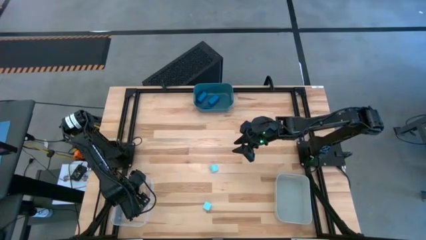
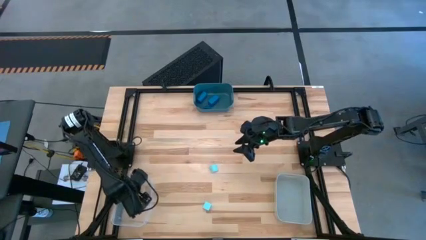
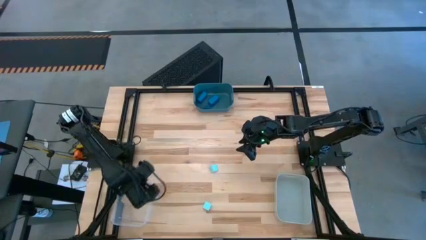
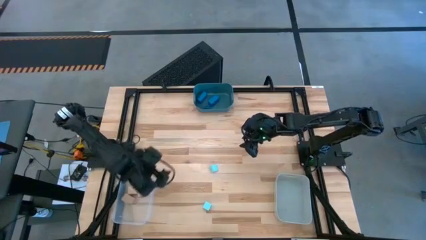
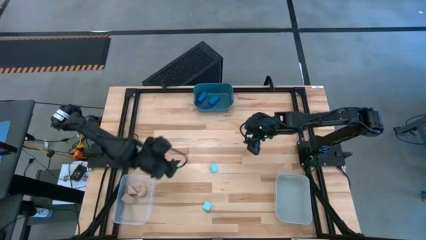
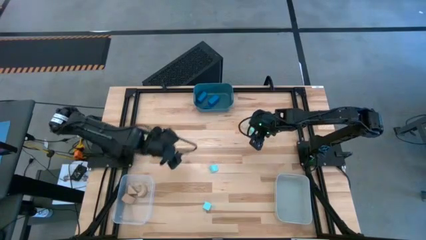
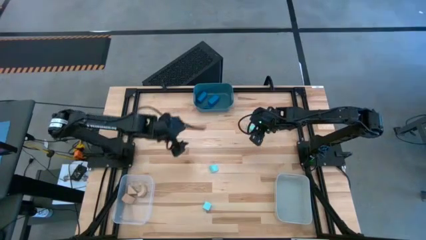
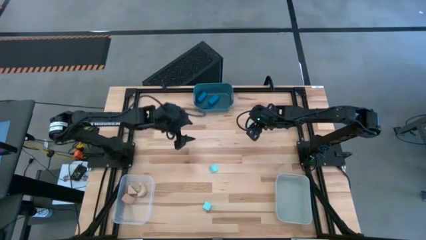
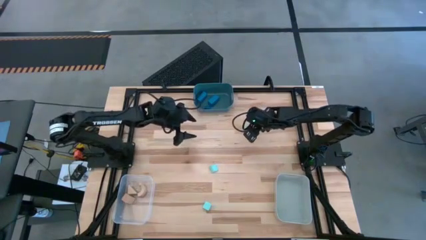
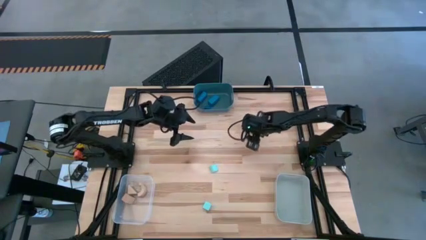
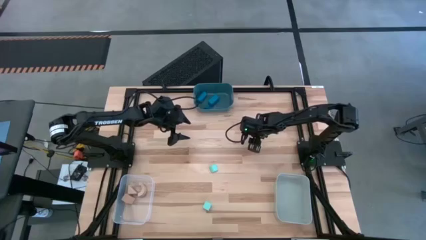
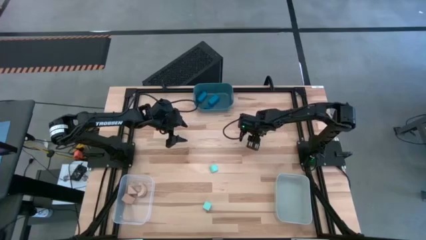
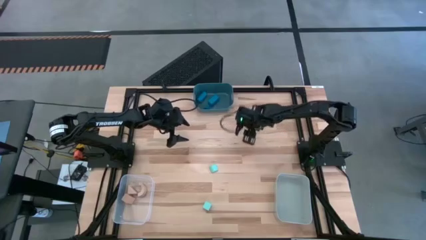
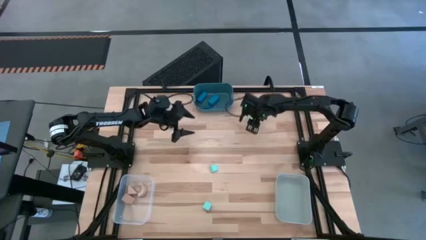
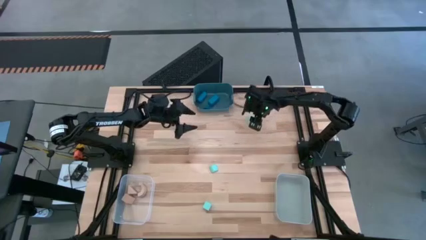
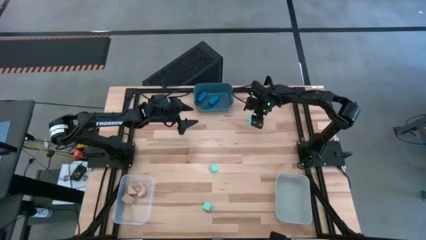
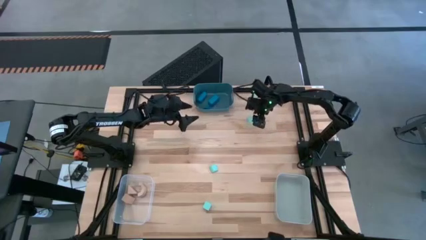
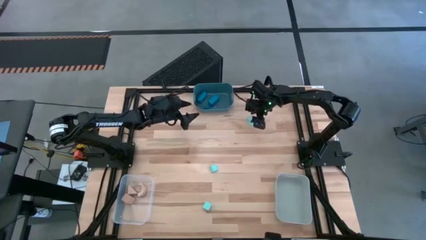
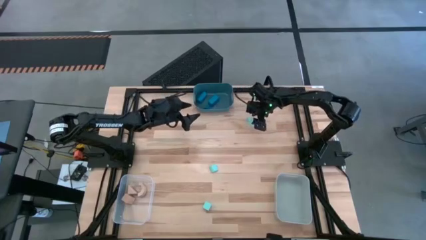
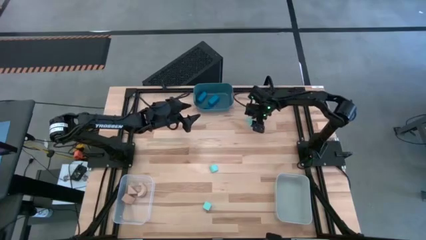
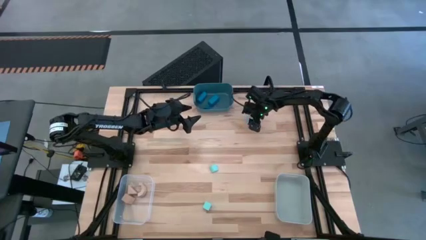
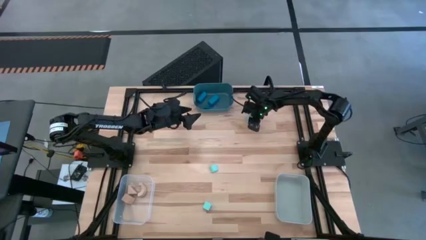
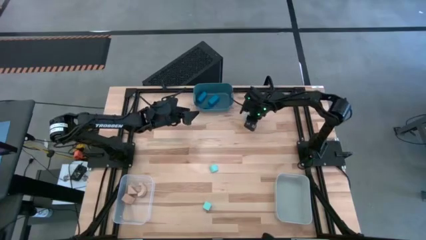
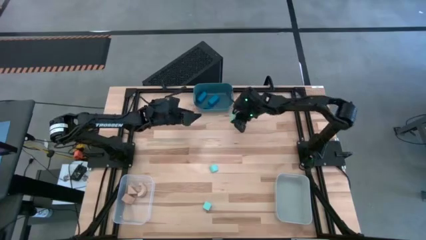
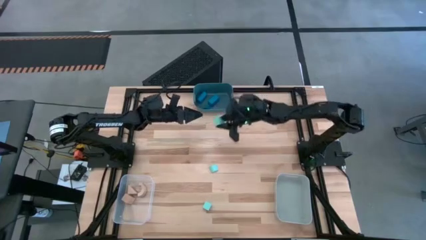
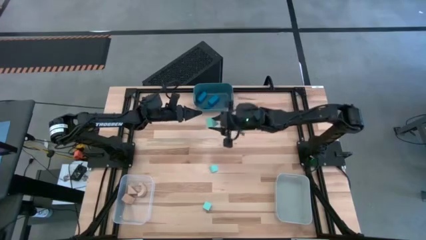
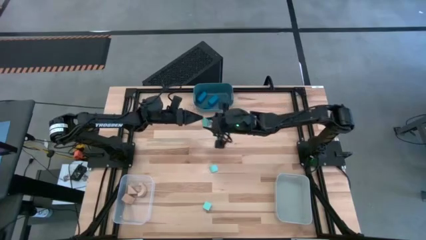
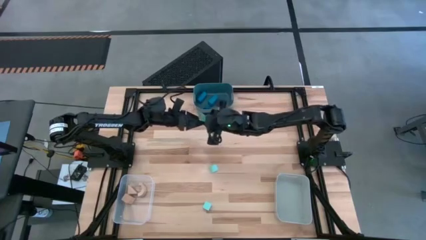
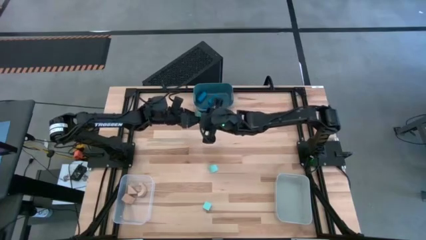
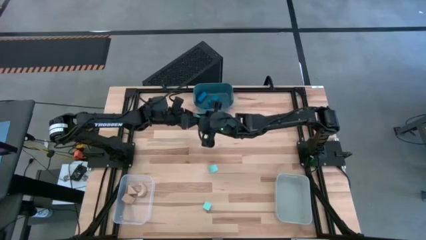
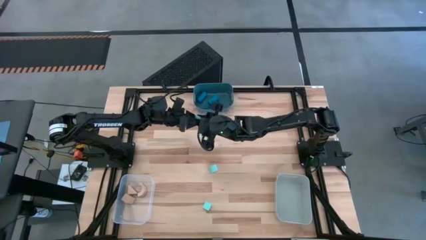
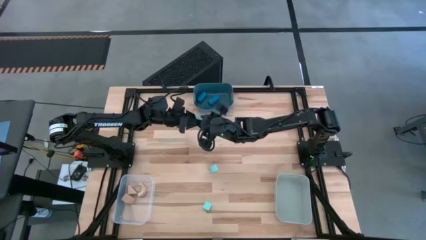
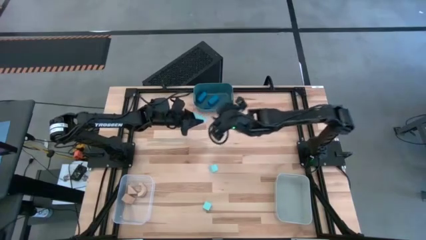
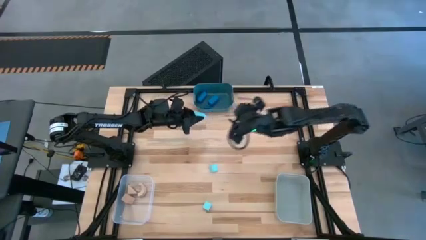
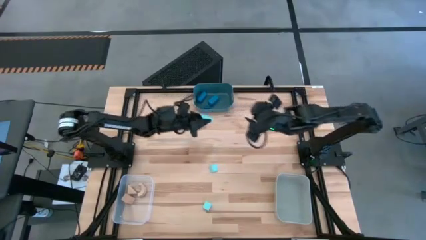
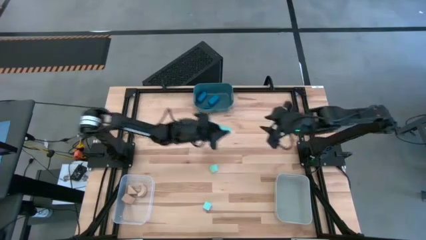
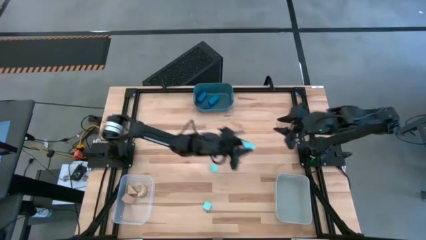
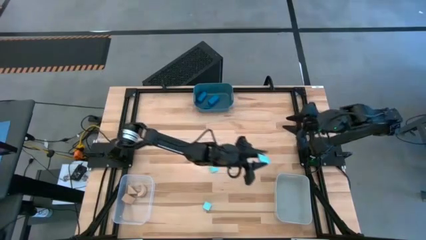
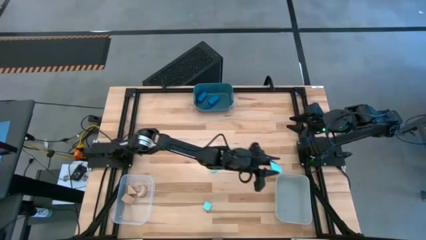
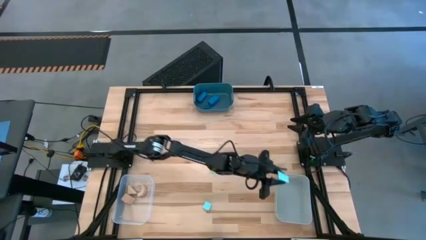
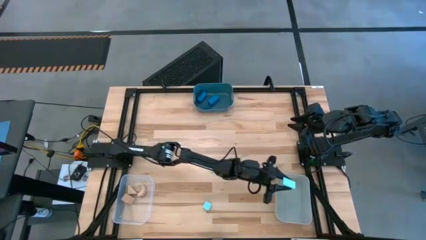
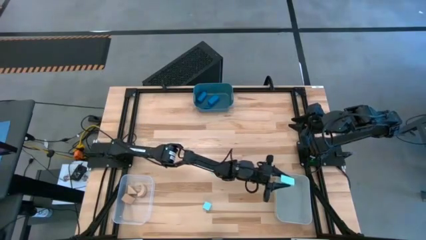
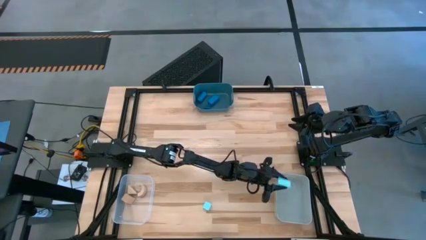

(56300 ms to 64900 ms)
Task: Sort & place blocks by color
Put the top right light blue block into the gray bin

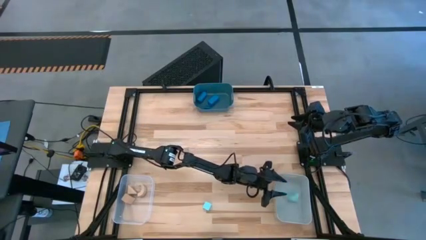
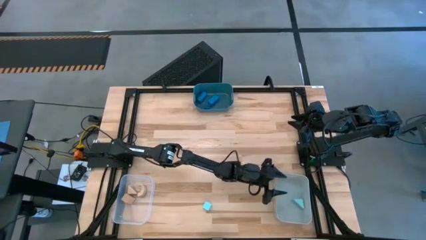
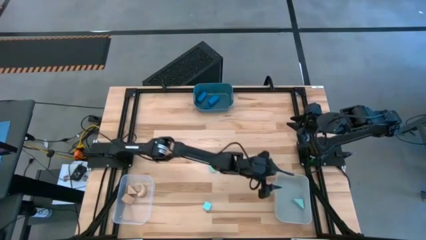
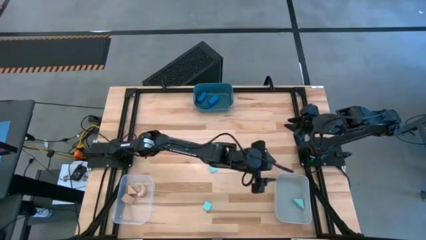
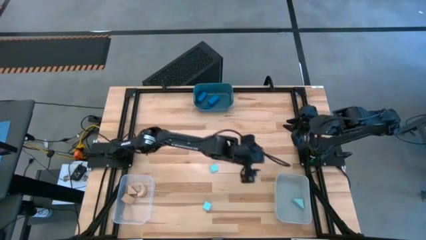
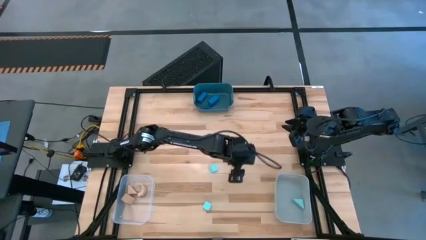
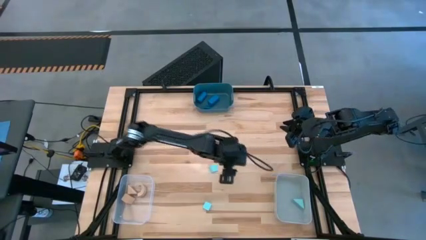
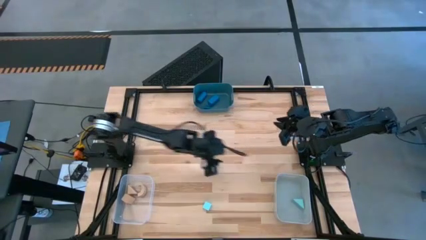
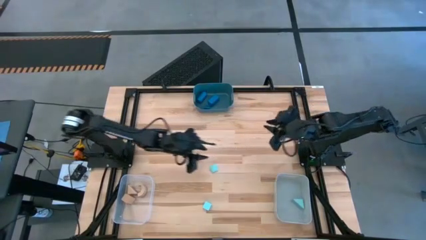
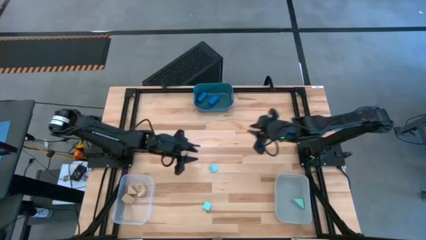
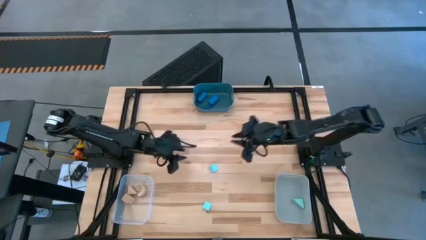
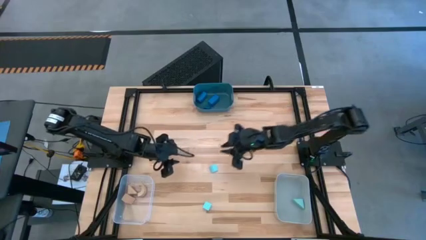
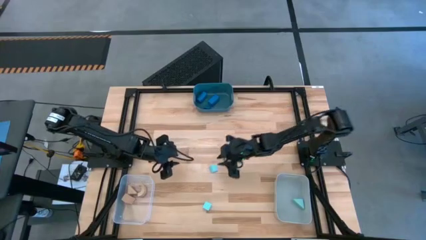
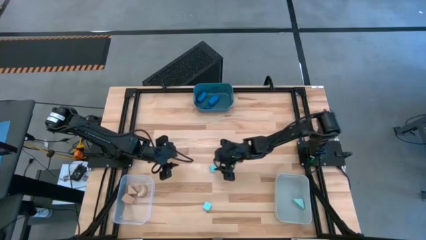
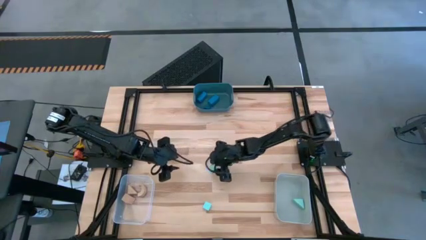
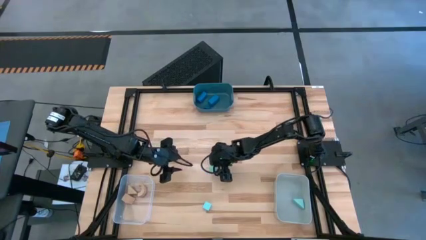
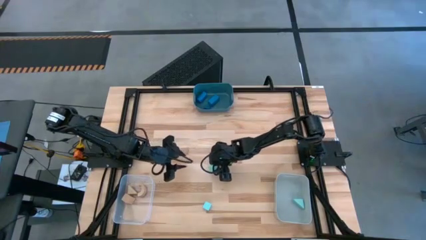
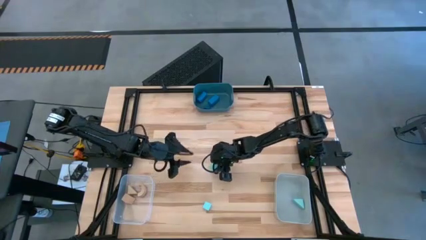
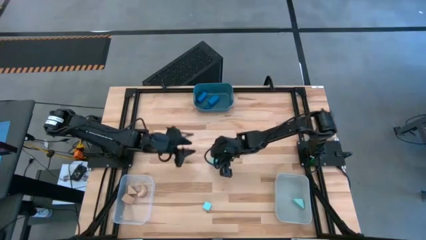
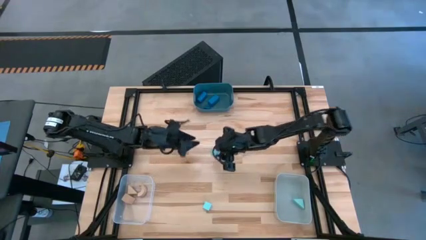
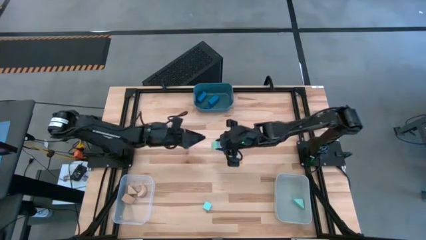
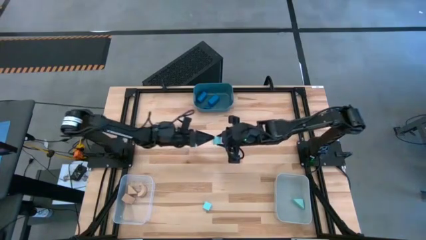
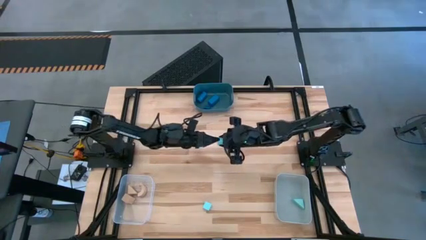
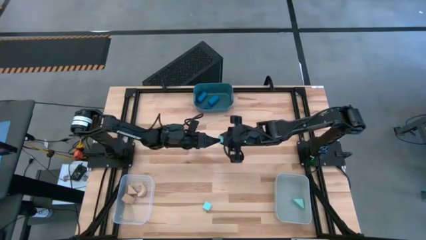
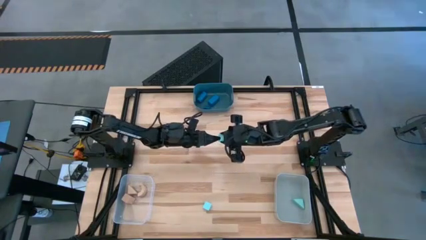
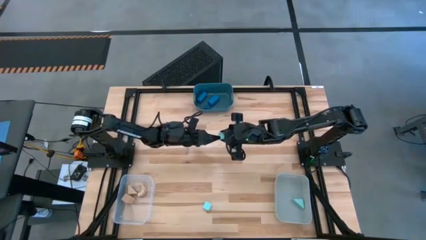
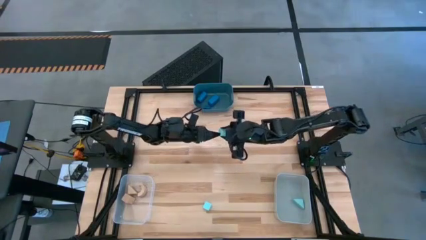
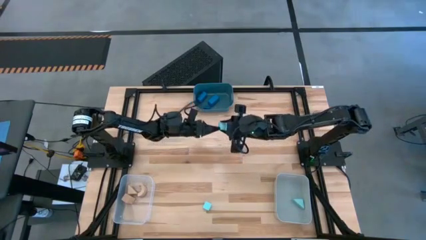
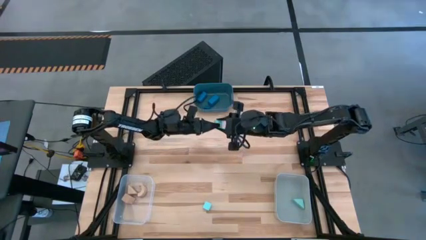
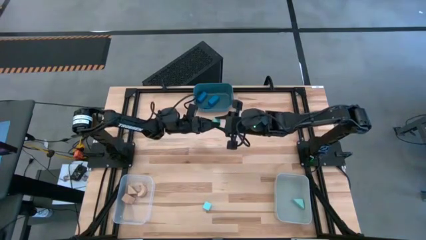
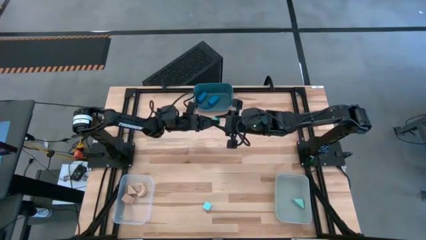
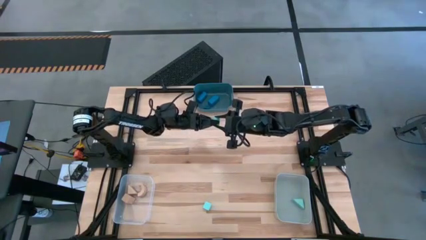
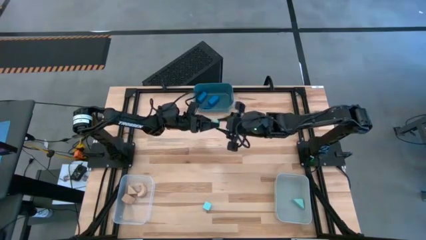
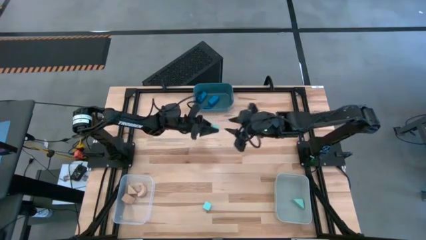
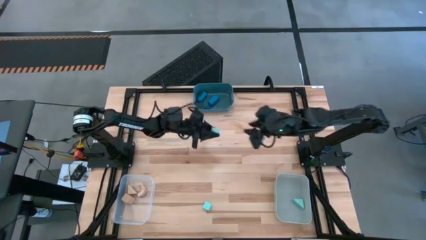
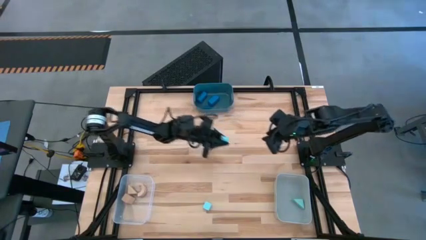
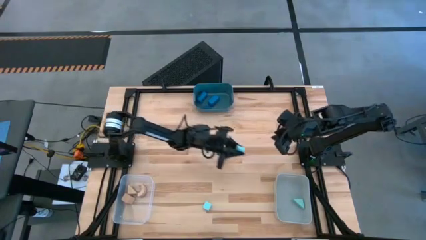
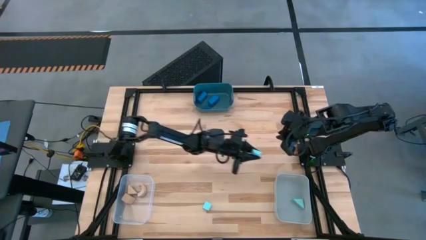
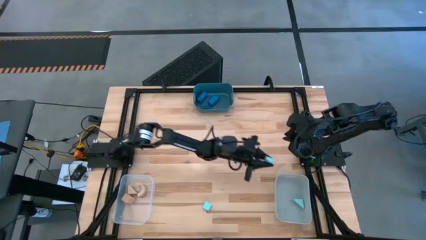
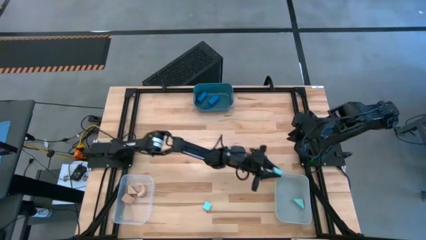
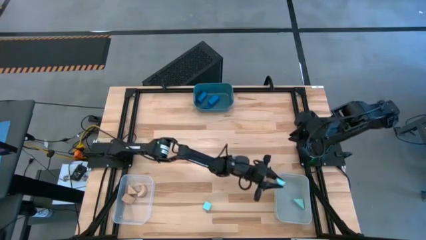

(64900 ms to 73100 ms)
Put the top light blue block into the gray bin
